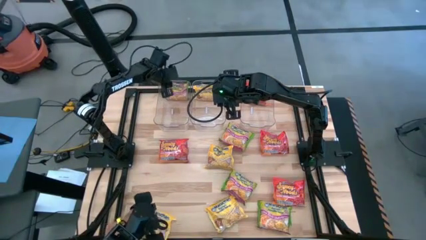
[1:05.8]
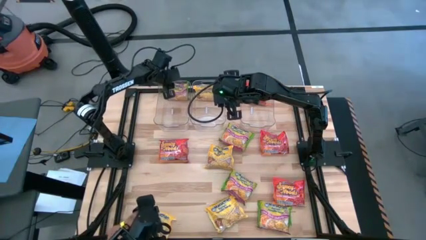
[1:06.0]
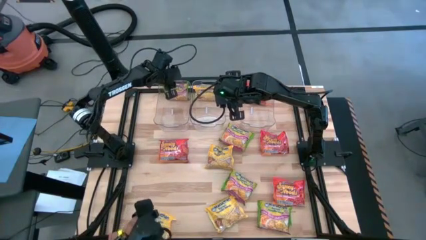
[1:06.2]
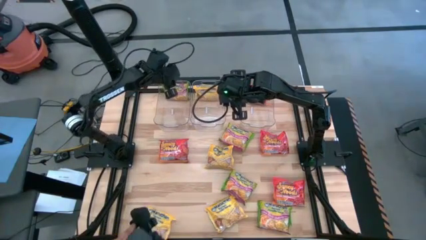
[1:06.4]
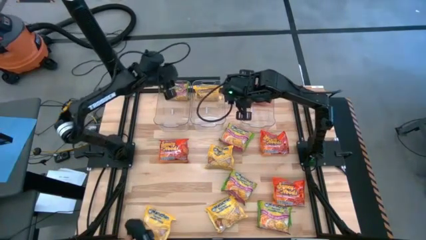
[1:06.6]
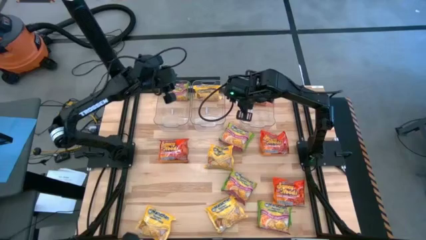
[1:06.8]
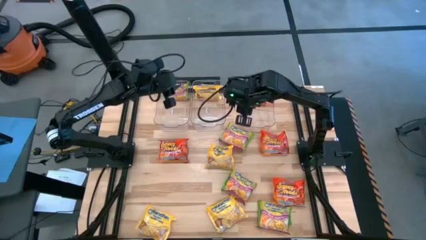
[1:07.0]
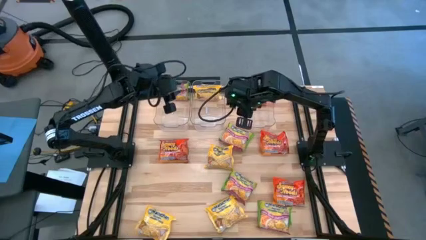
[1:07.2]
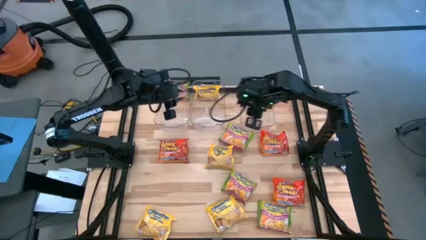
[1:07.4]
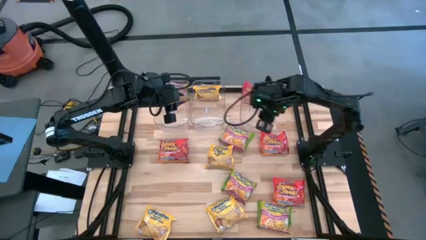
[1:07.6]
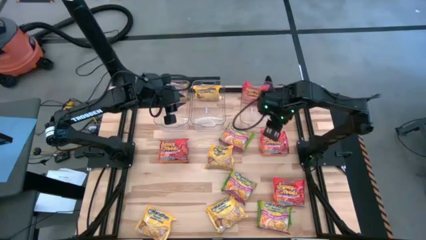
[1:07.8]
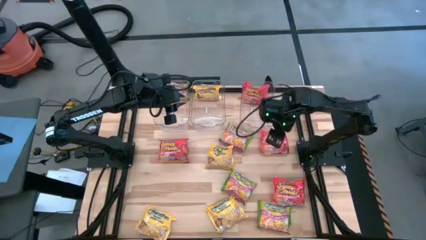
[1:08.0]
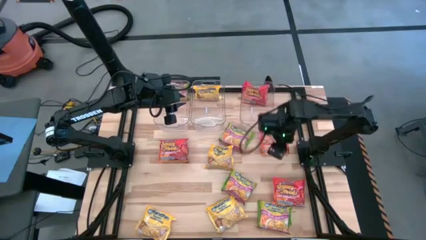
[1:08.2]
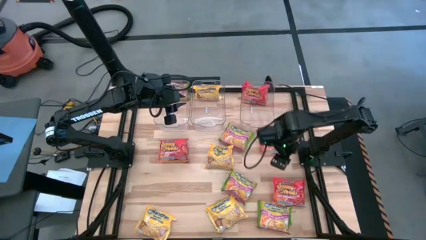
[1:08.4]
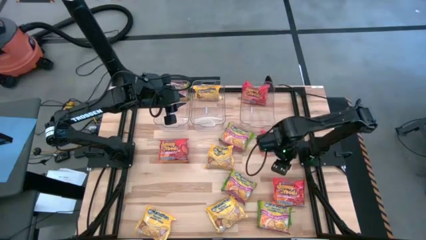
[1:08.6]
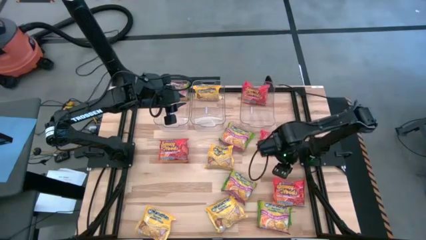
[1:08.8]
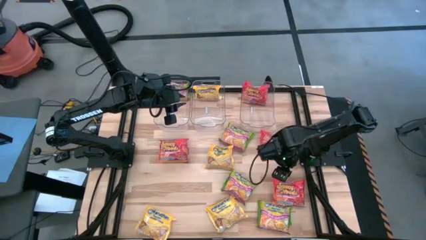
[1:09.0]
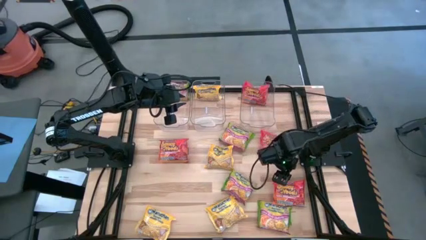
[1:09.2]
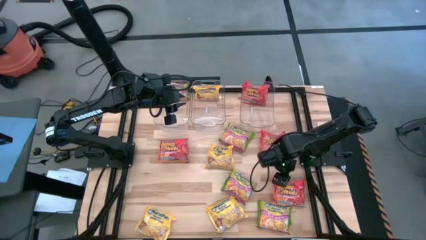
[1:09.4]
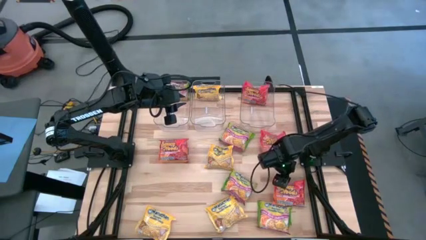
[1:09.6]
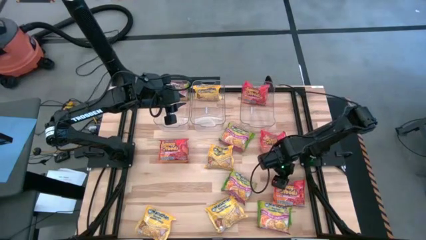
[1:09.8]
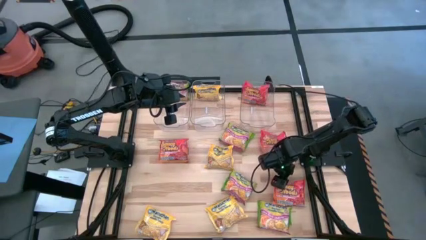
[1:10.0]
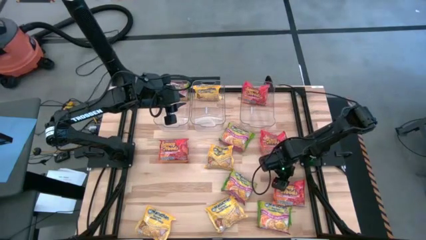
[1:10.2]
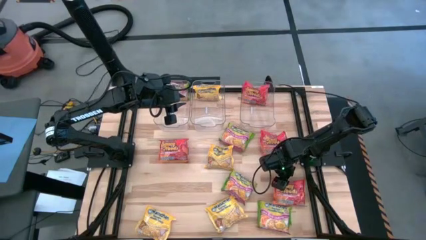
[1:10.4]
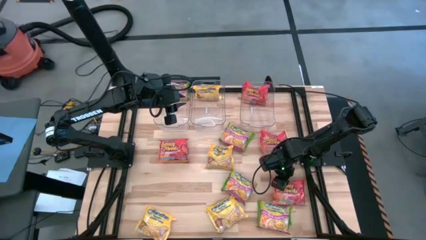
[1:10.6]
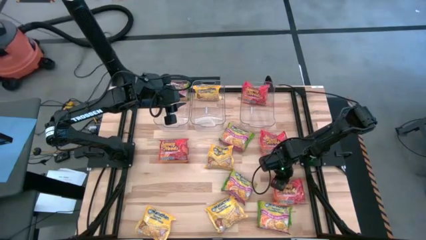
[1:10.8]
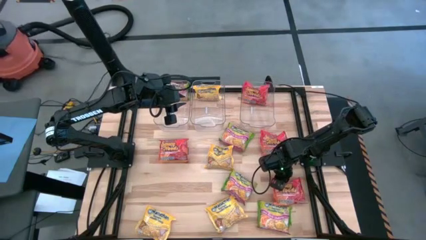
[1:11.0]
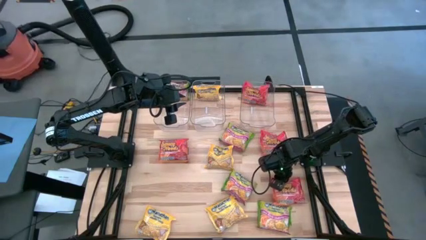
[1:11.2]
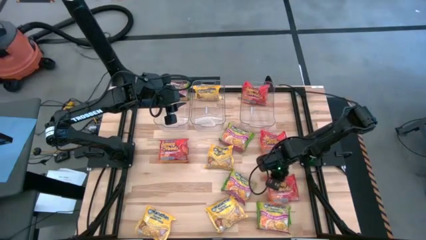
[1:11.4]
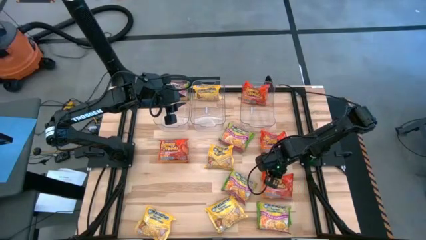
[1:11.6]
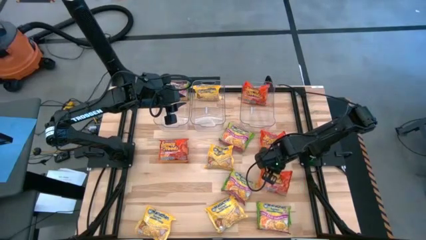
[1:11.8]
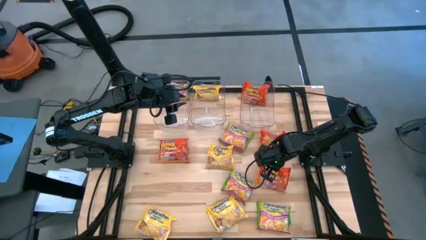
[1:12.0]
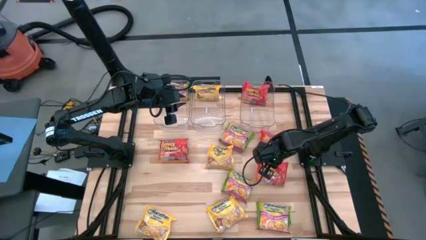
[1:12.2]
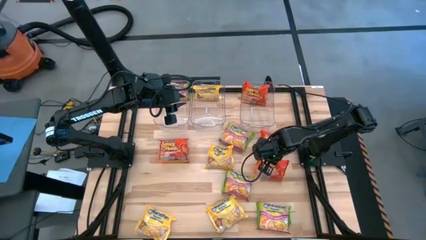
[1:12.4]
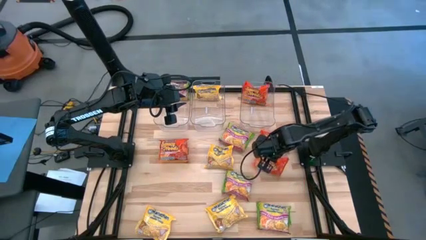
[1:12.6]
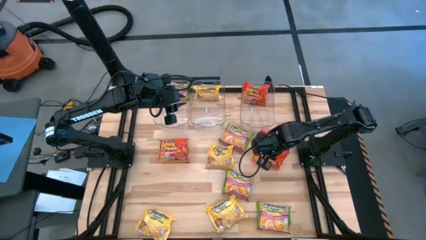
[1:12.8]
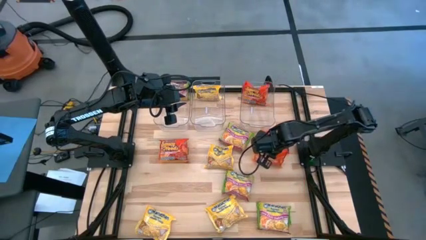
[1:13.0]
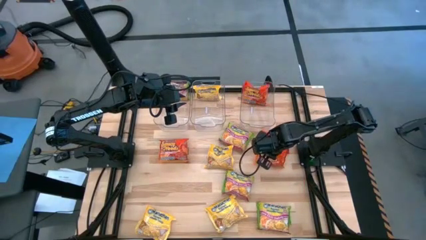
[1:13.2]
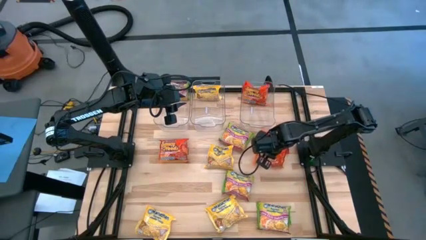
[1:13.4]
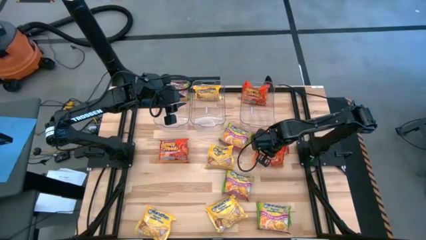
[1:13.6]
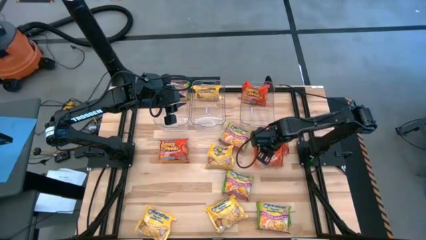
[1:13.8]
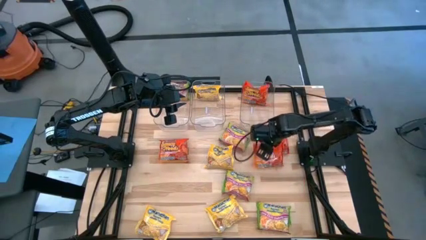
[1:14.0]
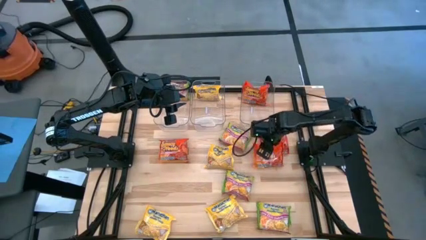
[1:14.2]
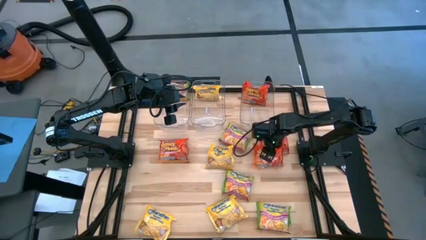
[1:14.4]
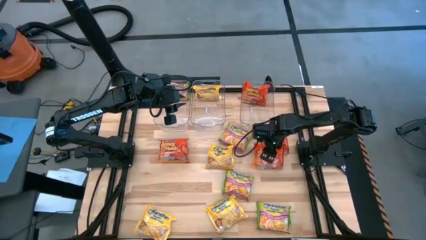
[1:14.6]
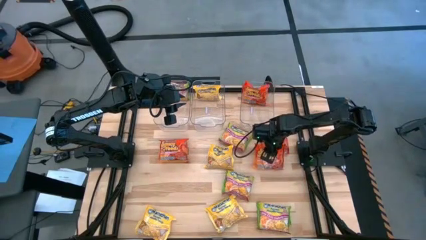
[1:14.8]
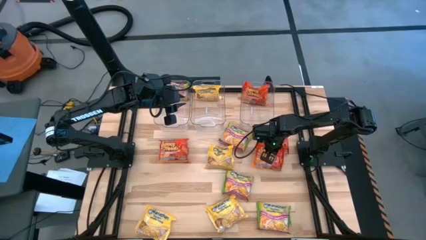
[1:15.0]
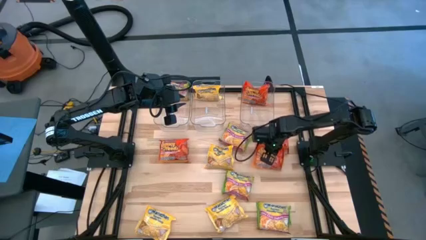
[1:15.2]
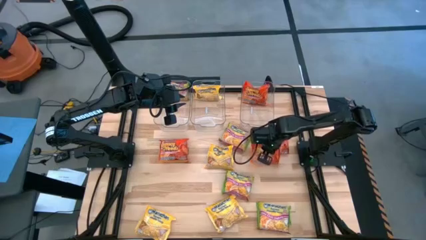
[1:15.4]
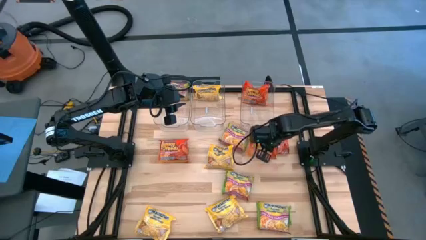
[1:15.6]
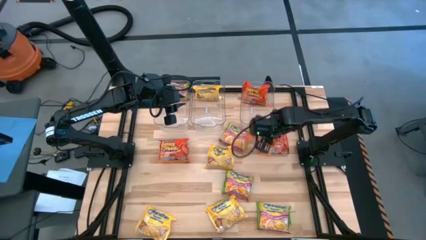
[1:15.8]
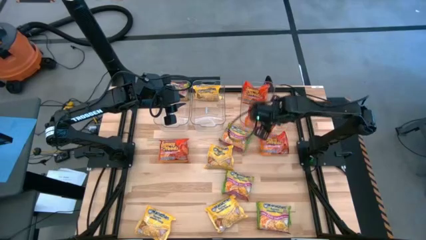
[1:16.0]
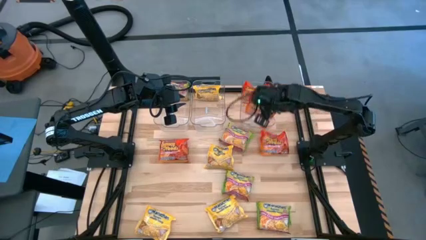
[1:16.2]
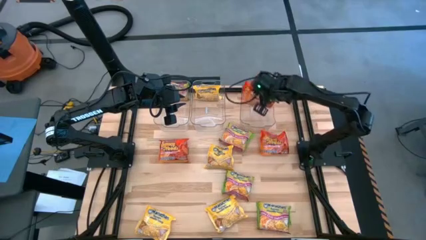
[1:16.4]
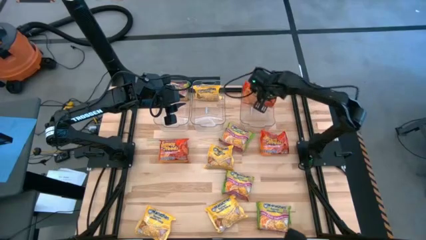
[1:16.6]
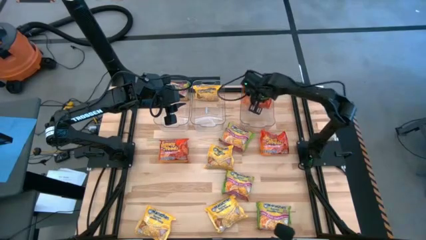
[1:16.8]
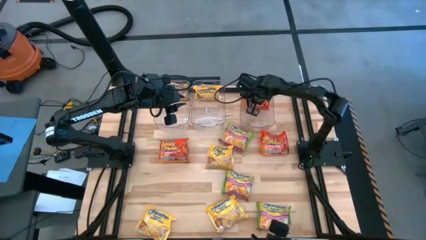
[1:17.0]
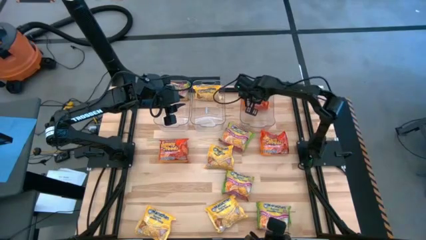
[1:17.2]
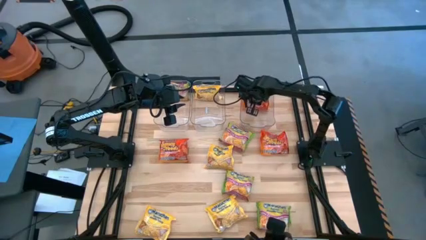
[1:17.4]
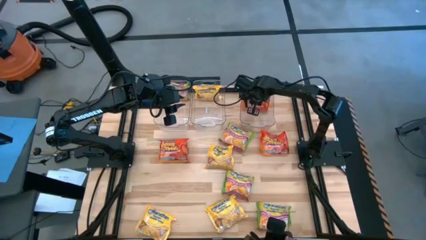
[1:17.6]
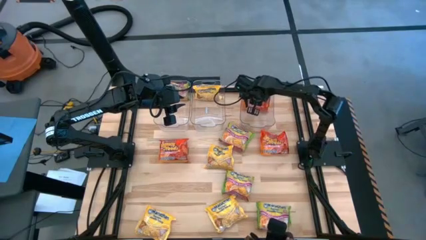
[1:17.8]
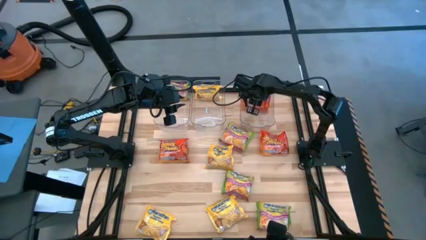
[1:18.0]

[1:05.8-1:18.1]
Task: Sort Maruchan noodles
Put the orange noodle pack into the right transparent bin
